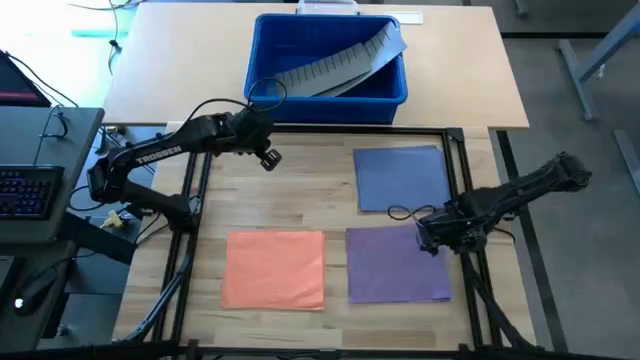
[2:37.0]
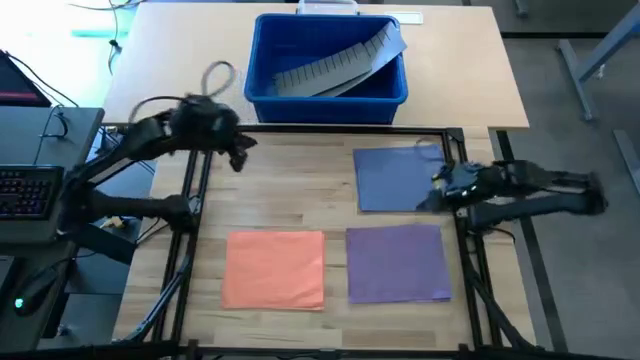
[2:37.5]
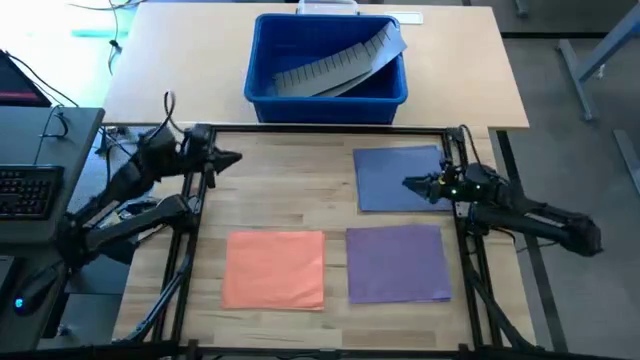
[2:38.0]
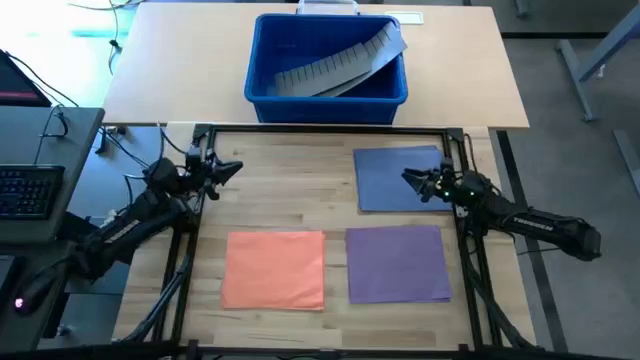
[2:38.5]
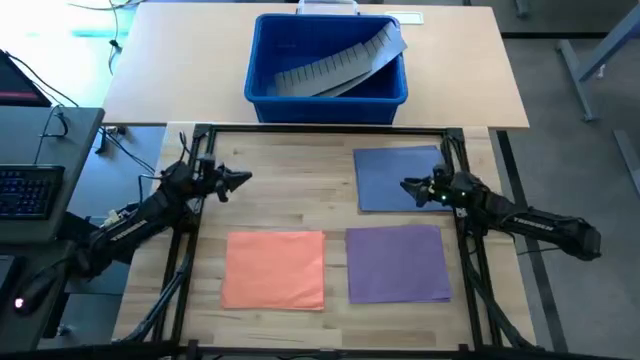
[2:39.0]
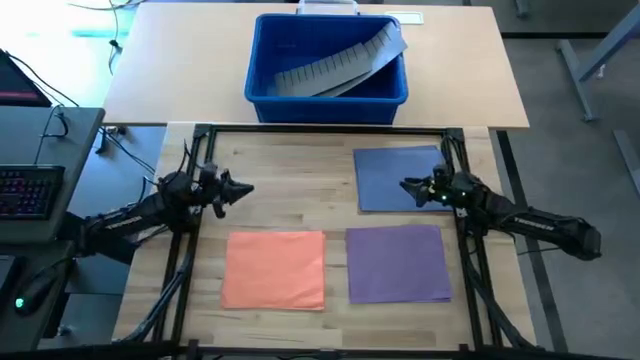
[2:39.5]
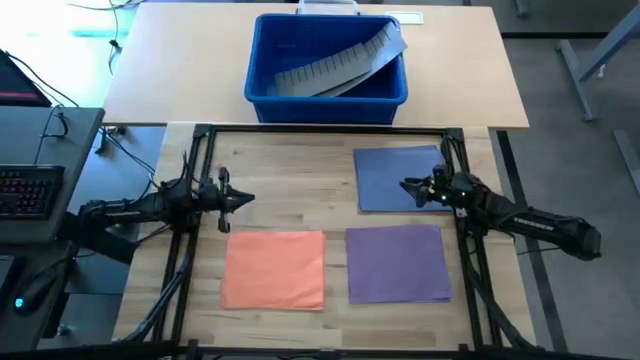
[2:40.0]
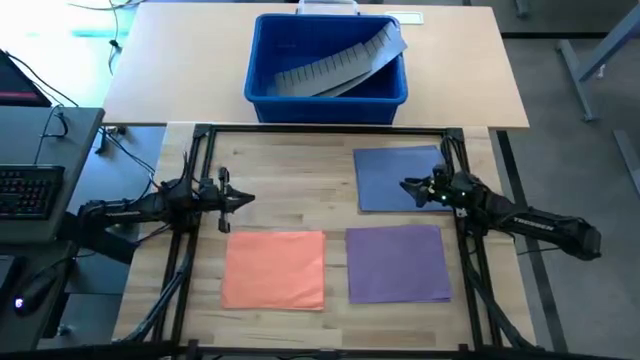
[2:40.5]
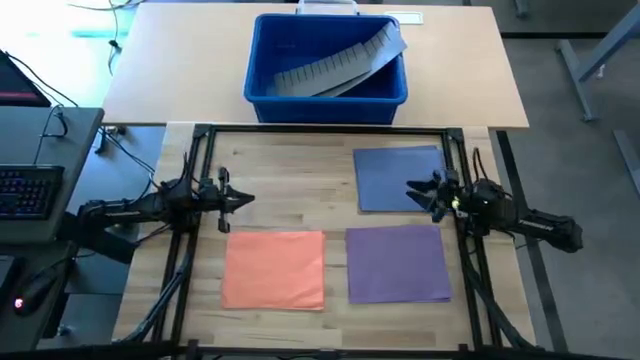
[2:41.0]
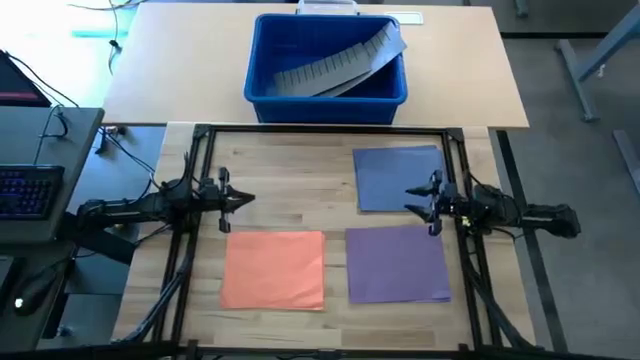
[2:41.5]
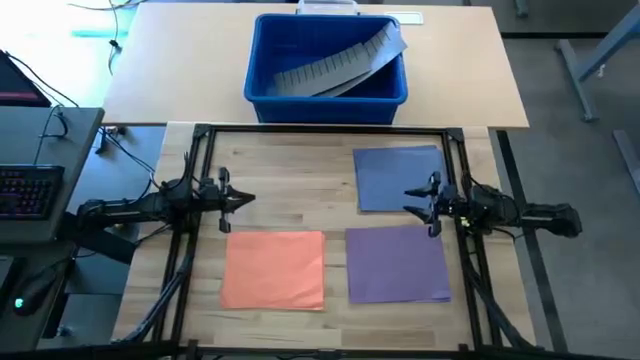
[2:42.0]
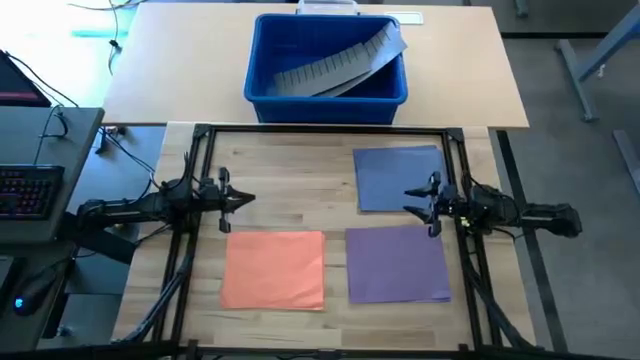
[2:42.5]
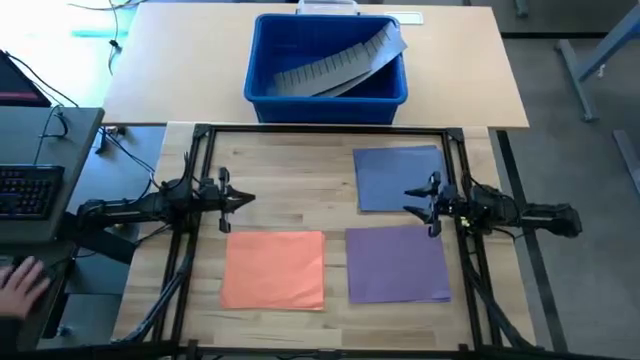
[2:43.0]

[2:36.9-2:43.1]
Task: Organize paper
Return to Home Position

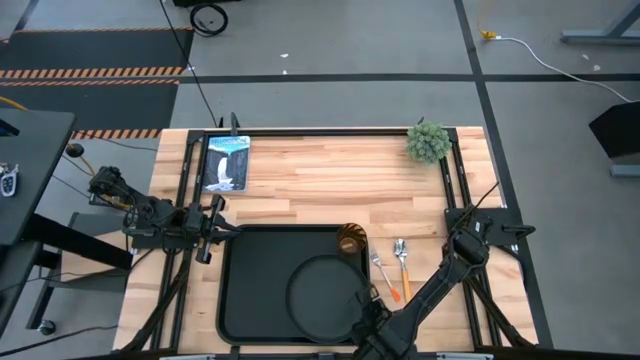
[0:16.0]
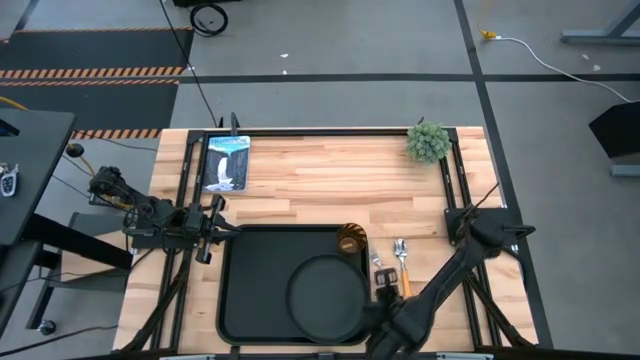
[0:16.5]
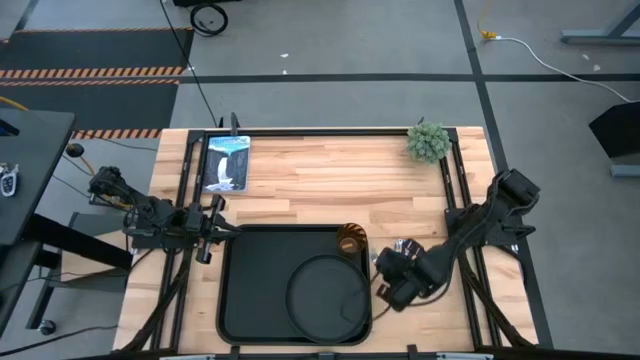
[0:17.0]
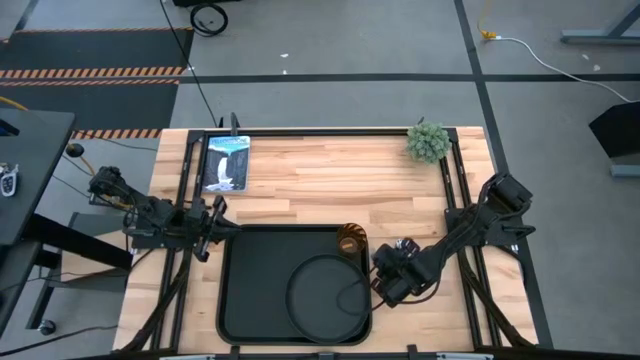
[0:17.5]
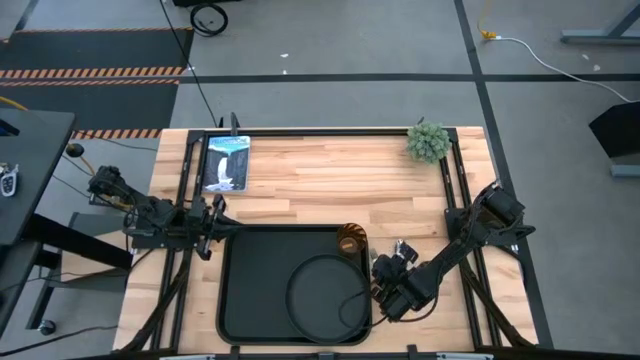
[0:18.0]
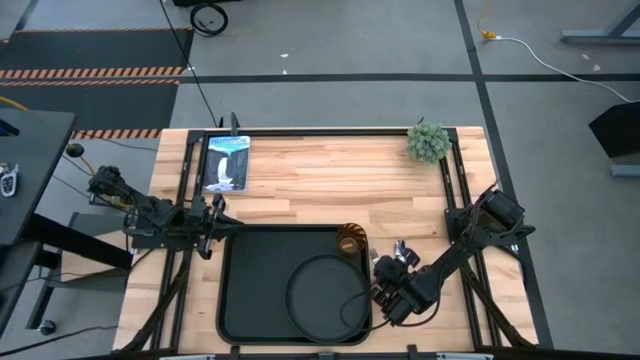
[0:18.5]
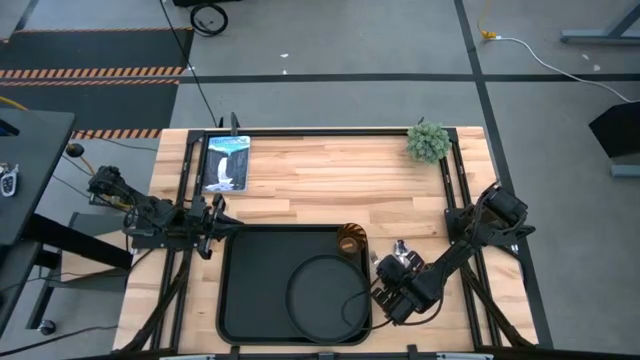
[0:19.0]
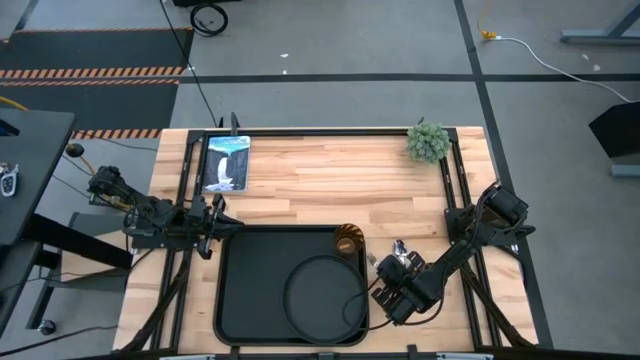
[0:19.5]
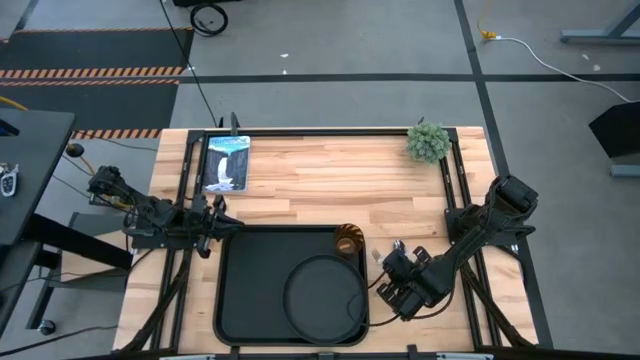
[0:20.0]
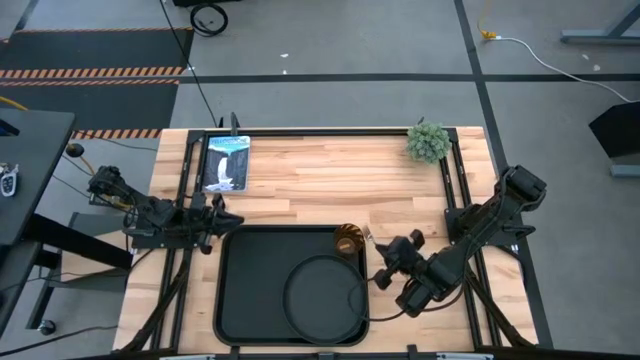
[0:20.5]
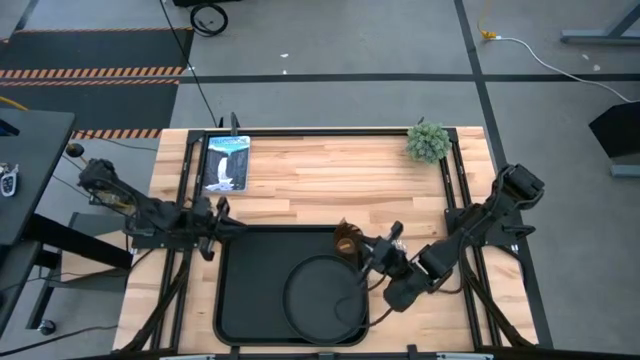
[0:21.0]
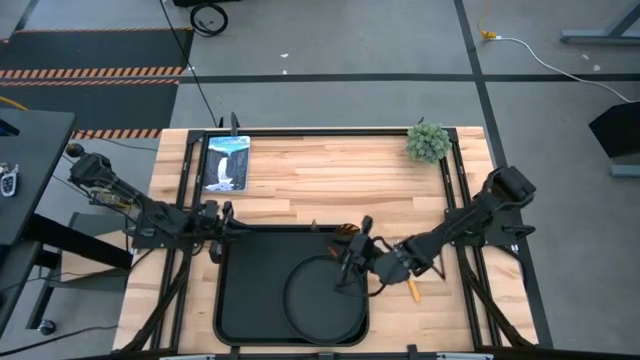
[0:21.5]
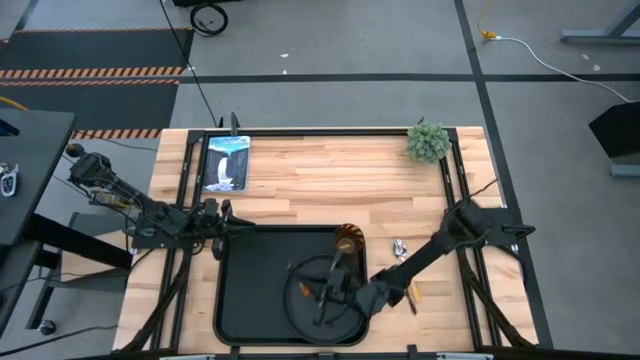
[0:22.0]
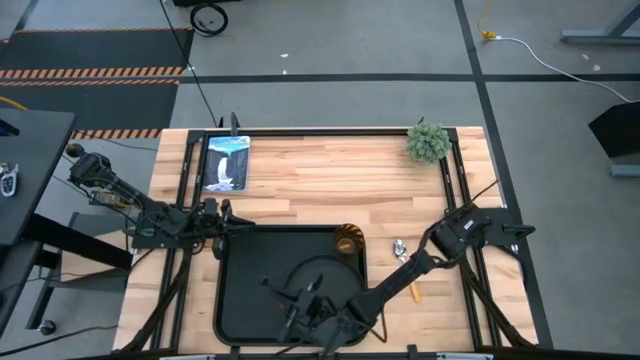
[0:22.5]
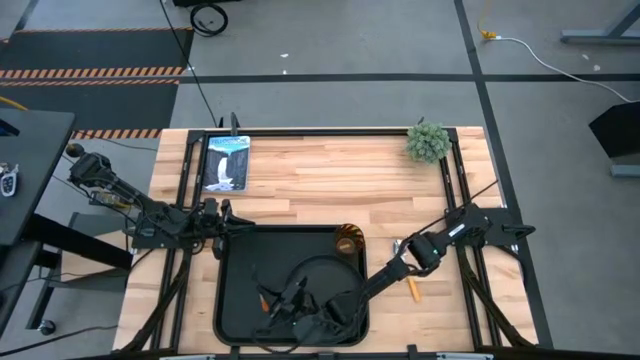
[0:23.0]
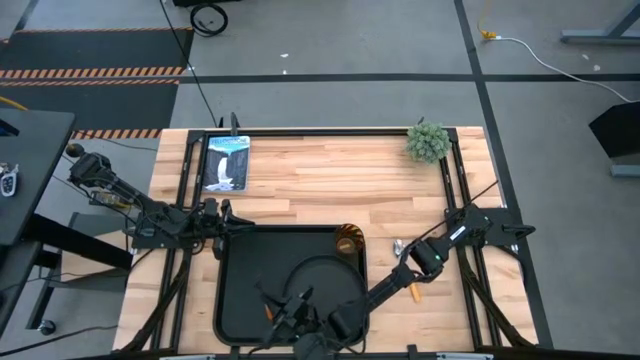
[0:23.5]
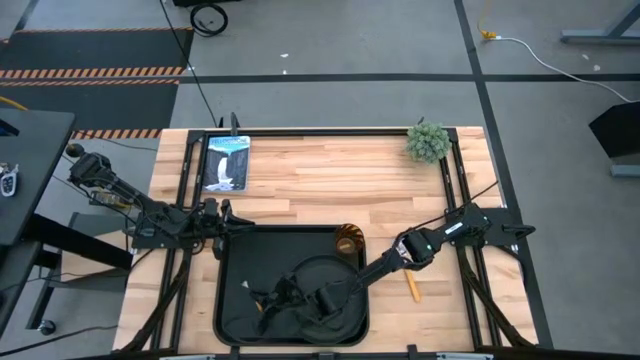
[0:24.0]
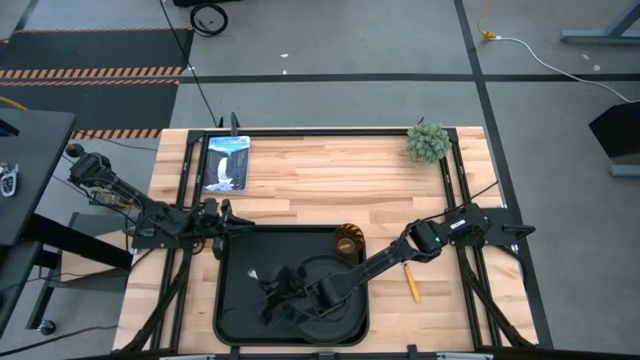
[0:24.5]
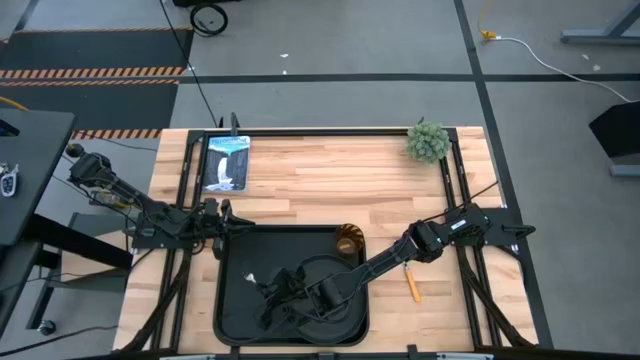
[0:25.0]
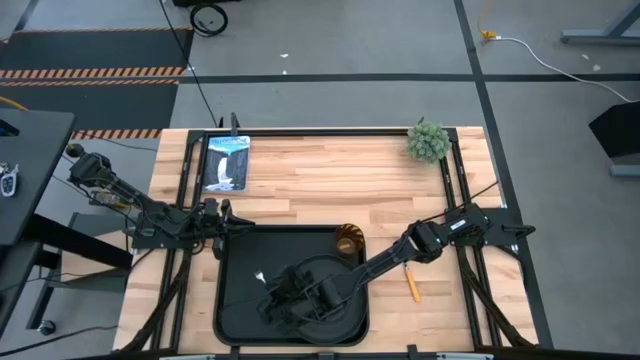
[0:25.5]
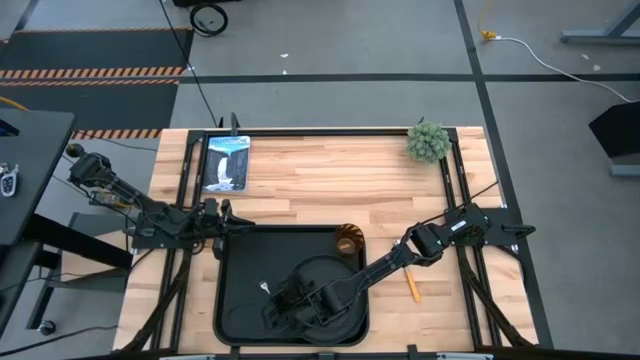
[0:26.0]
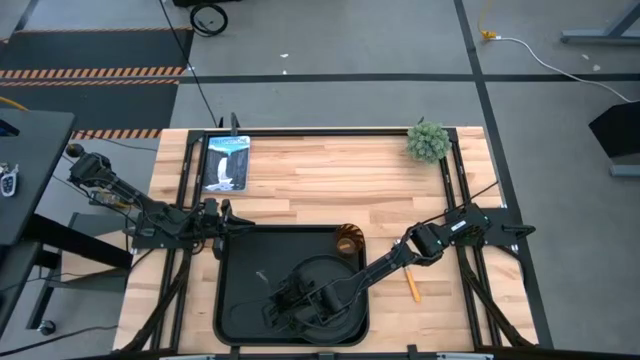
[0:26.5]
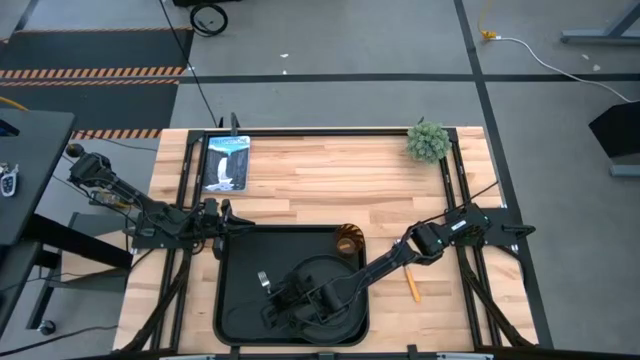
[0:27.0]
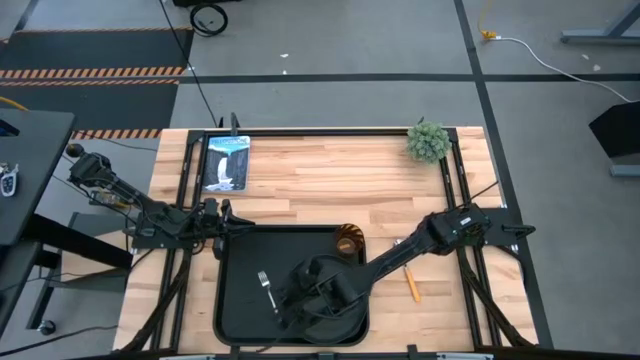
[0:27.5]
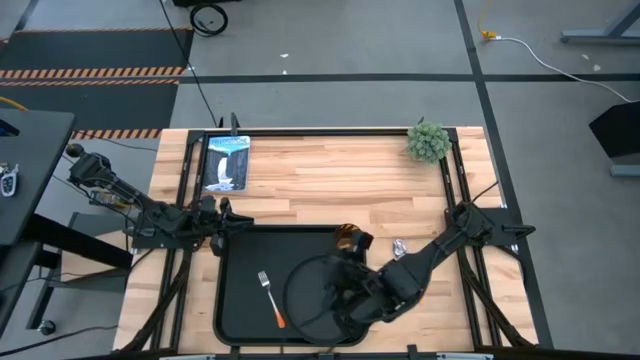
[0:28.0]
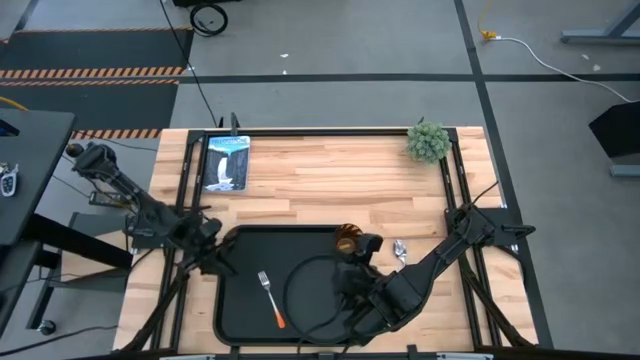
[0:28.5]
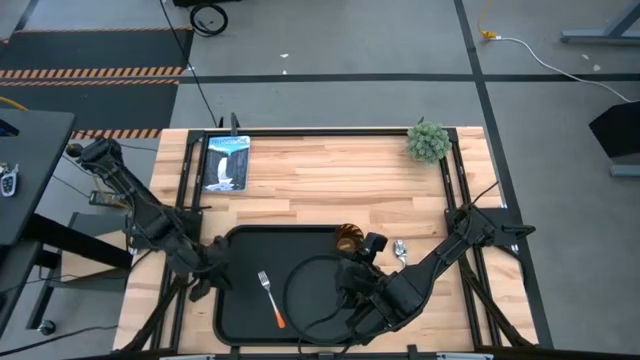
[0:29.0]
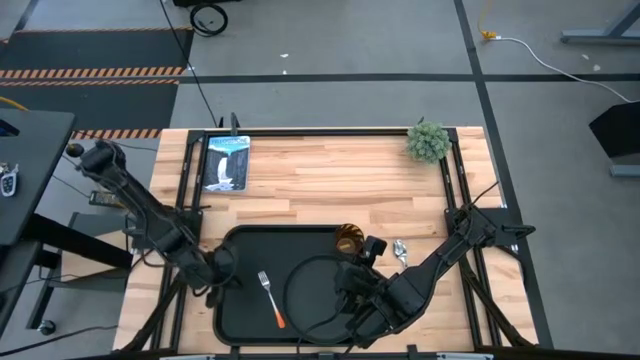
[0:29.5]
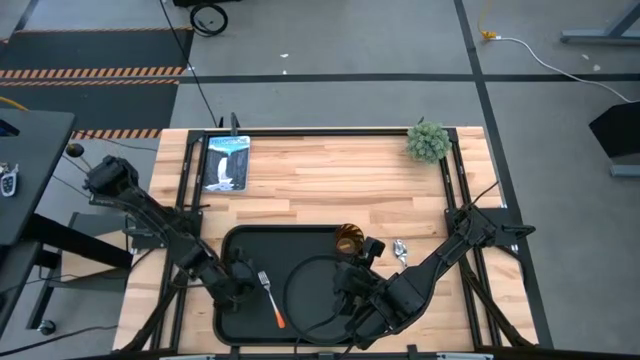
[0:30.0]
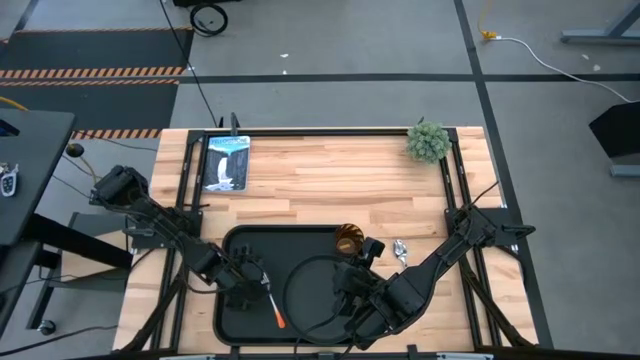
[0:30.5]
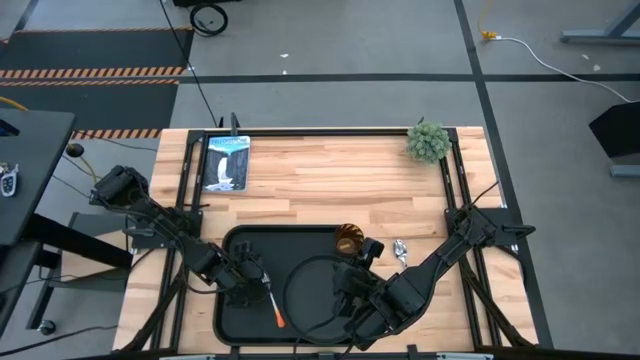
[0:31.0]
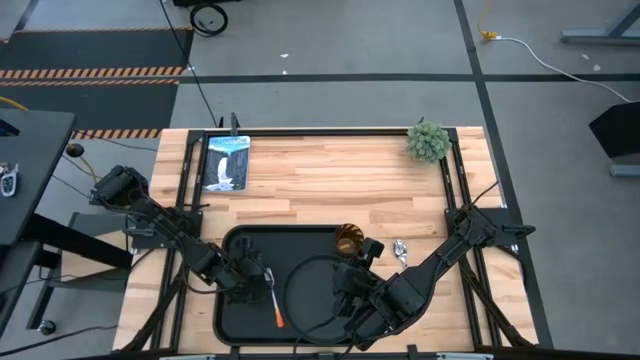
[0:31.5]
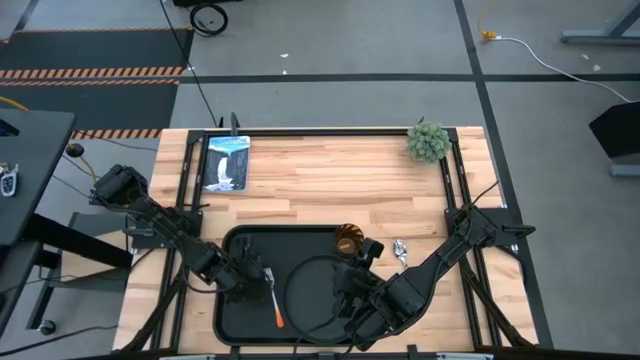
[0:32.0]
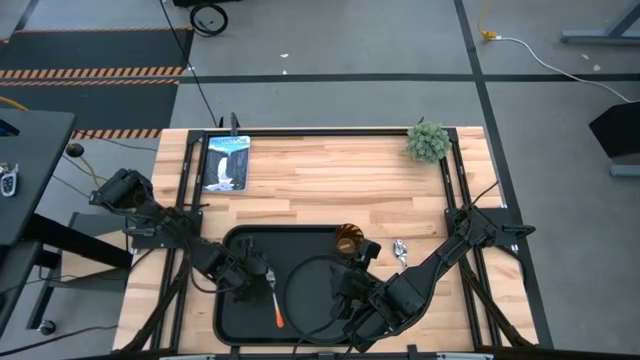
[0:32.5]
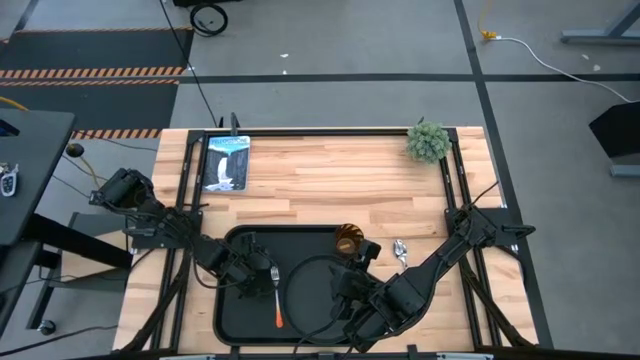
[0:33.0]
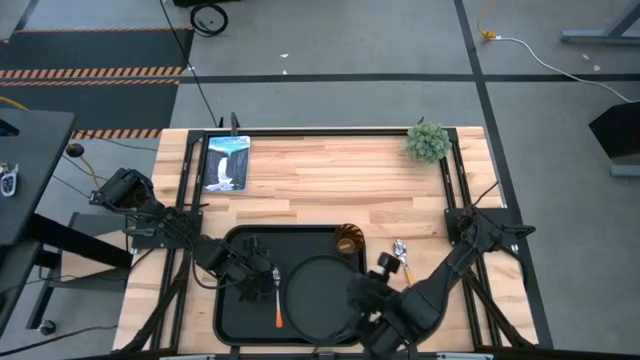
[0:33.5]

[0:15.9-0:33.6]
Task: Pick and place plate/cup/fork/spoon on tray
Put the orange fork on the left side of the black tray
